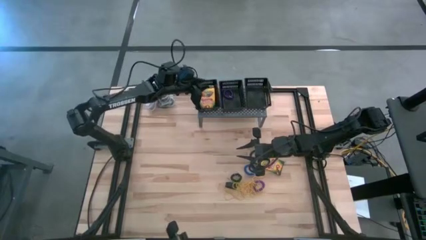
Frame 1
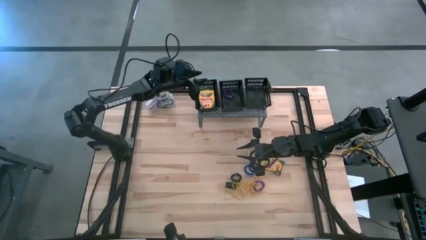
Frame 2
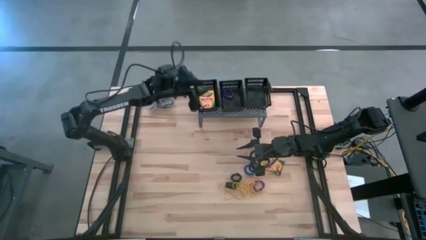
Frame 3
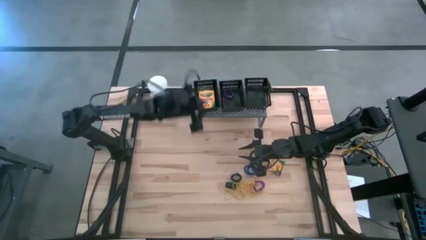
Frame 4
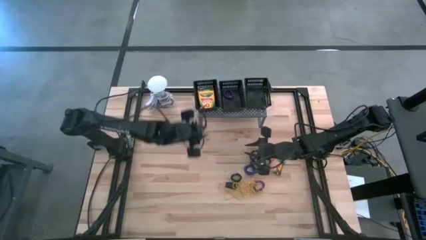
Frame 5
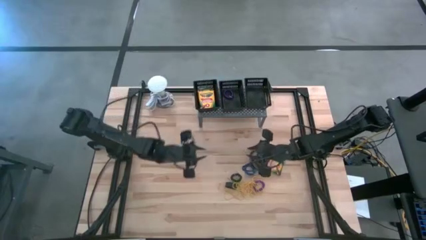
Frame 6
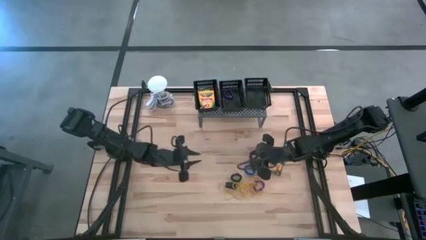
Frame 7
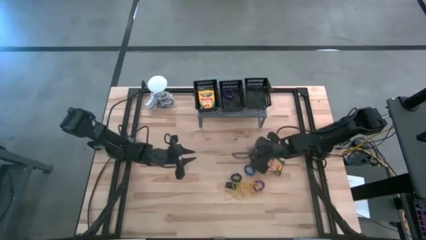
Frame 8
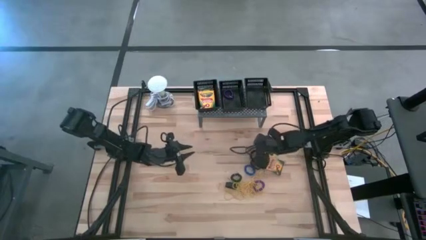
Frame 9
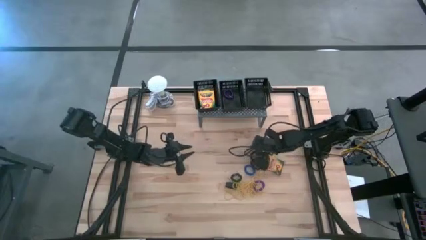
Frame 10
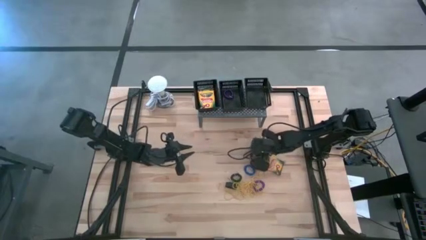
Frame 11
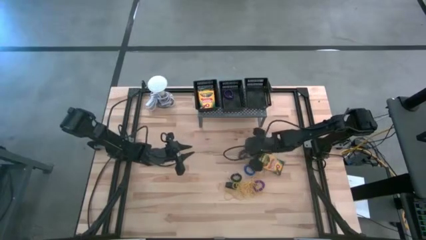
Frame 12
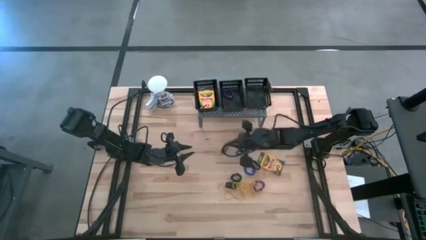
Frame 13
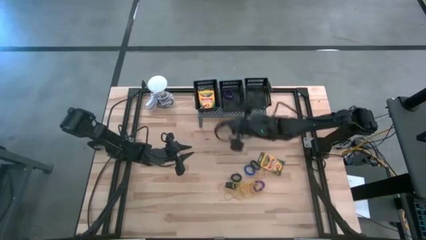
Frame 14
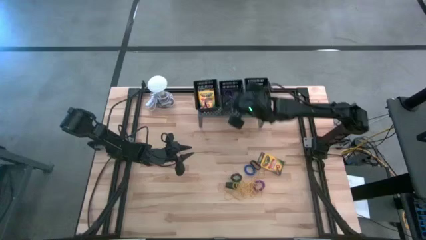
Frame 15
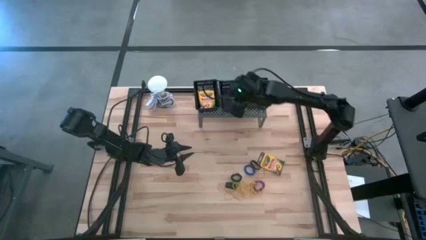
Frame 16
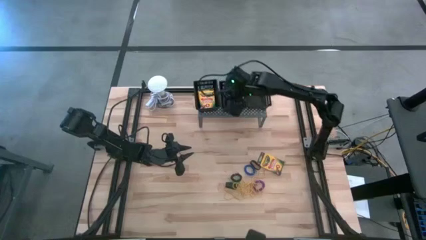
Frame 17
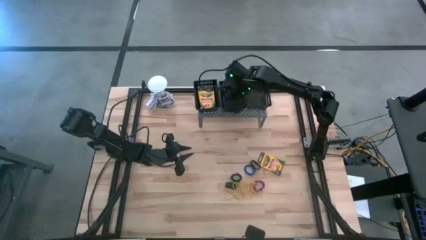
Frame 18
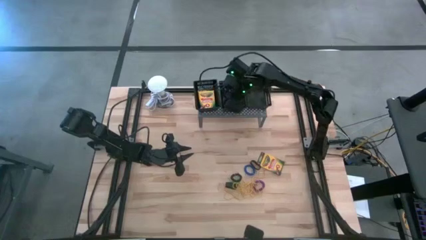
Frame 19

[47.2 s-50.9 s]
Task: Pick & Place Office Desk Supplies
Put the black spring keychain into the middle black bin on the shelf

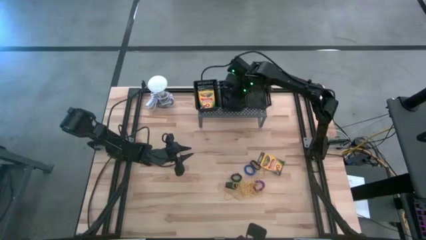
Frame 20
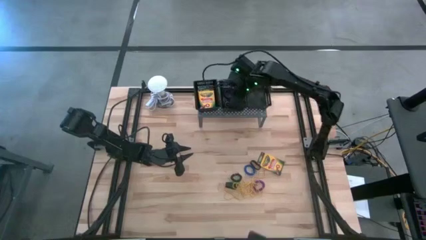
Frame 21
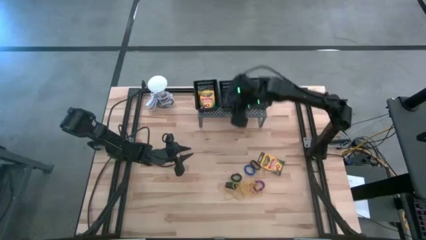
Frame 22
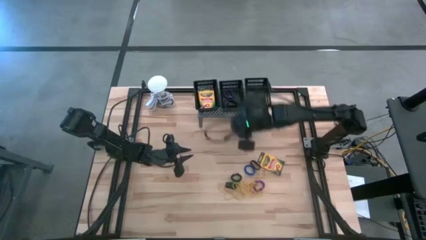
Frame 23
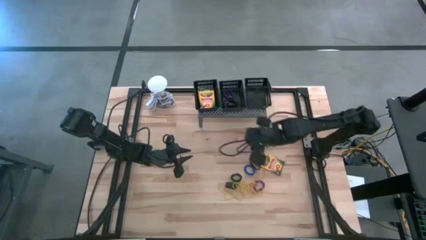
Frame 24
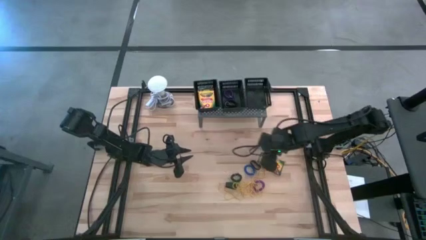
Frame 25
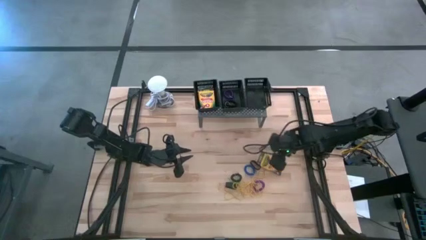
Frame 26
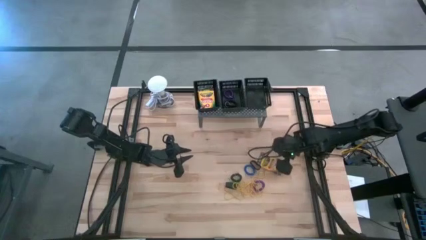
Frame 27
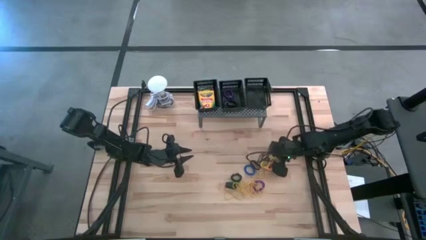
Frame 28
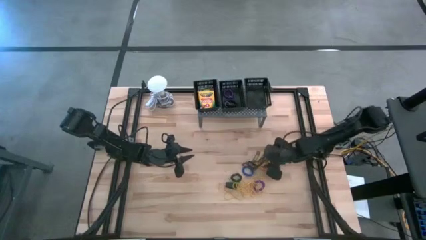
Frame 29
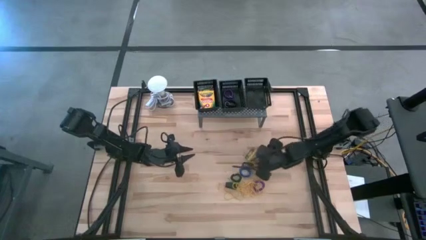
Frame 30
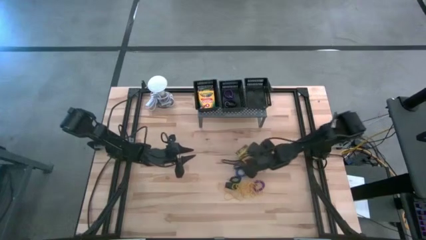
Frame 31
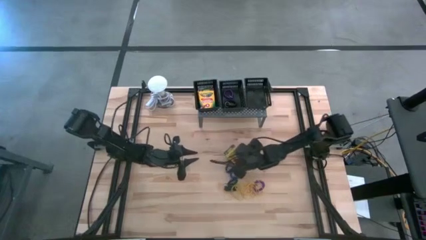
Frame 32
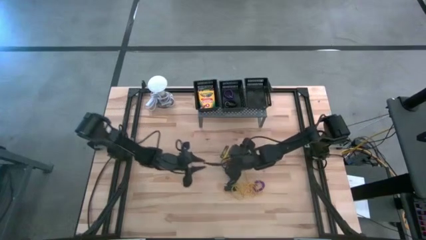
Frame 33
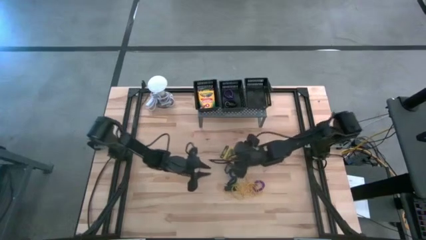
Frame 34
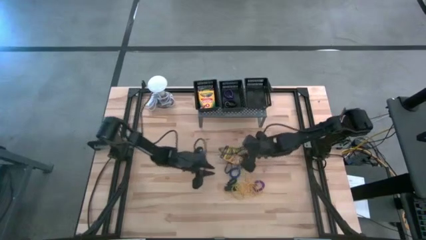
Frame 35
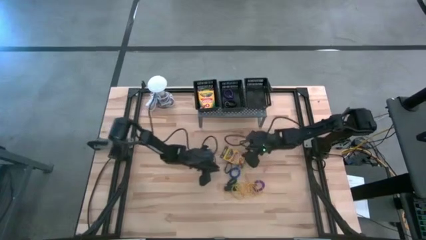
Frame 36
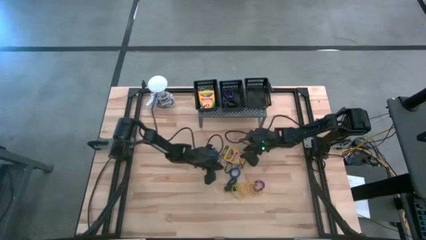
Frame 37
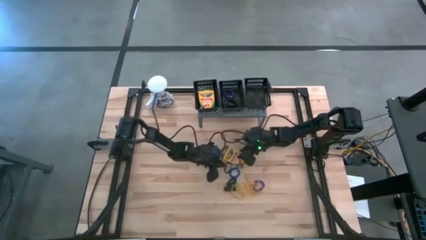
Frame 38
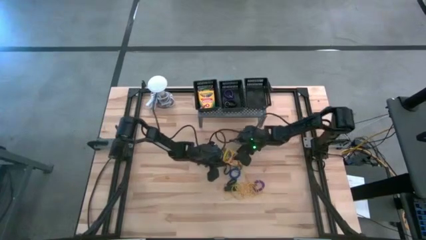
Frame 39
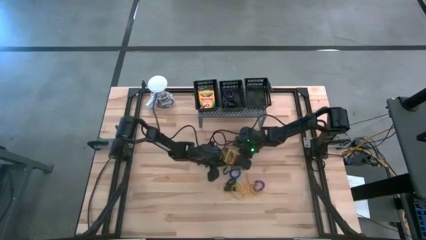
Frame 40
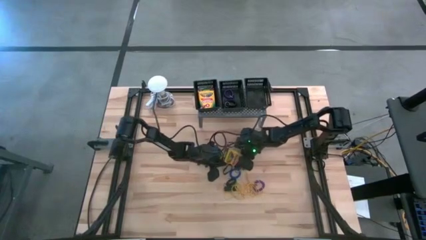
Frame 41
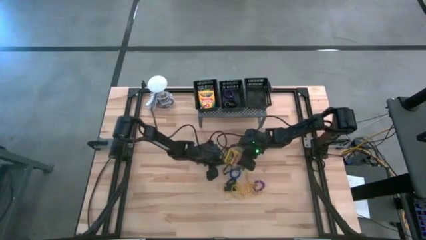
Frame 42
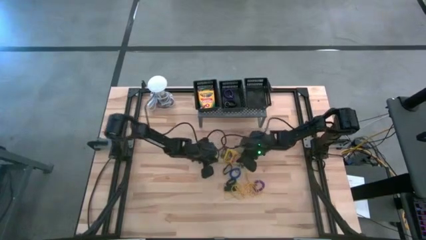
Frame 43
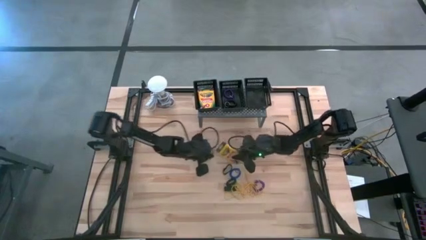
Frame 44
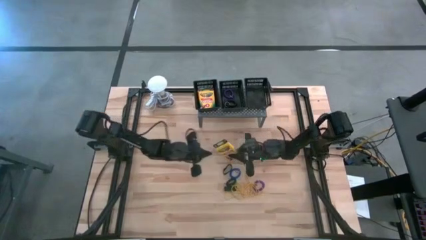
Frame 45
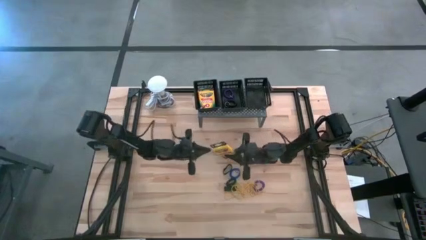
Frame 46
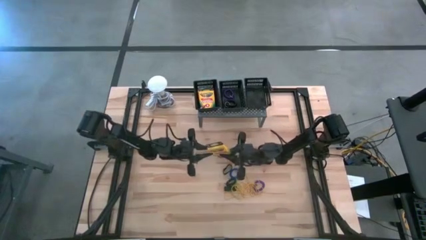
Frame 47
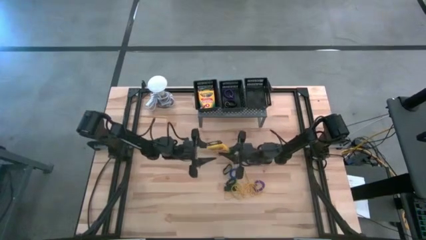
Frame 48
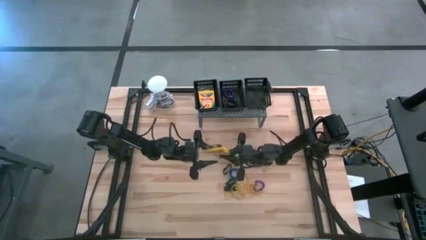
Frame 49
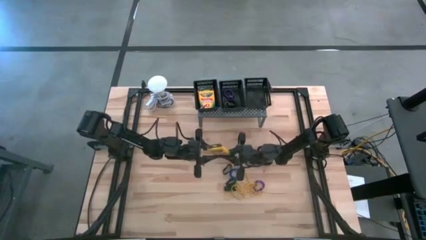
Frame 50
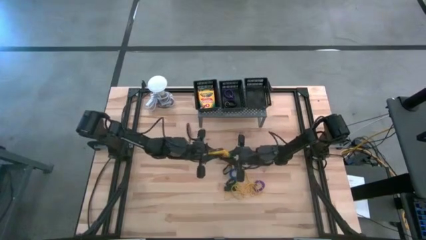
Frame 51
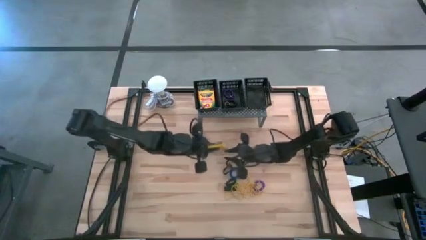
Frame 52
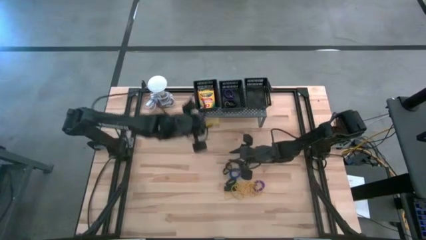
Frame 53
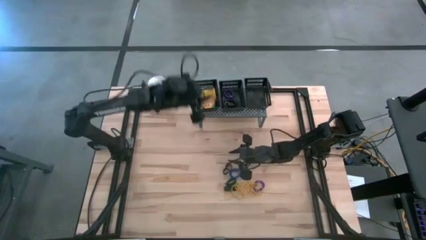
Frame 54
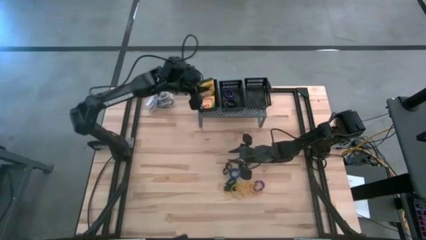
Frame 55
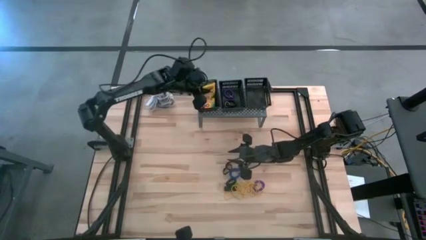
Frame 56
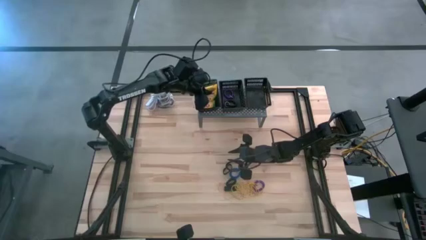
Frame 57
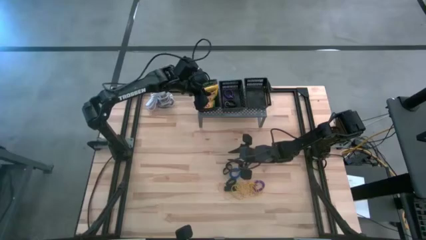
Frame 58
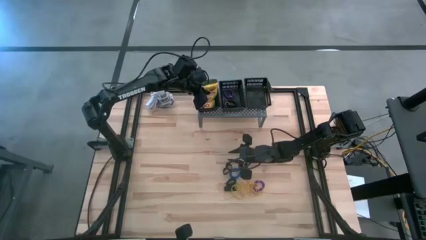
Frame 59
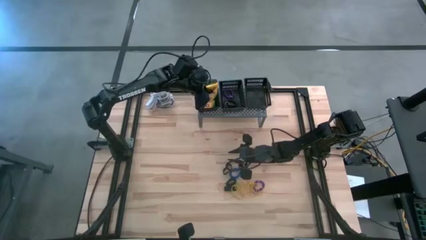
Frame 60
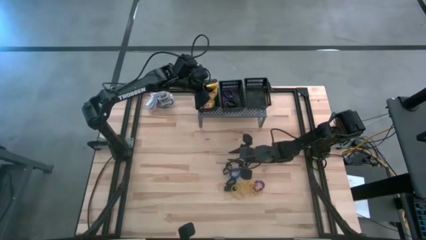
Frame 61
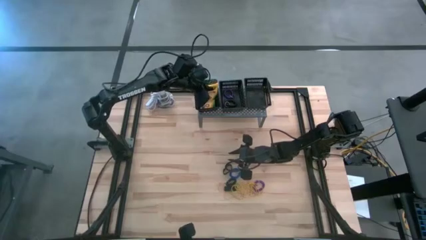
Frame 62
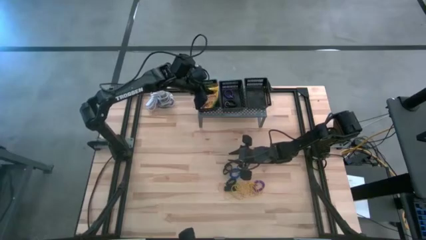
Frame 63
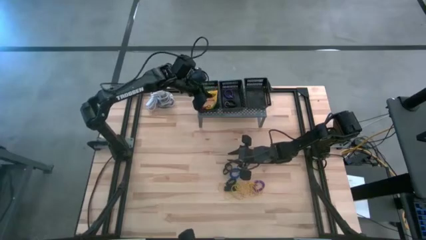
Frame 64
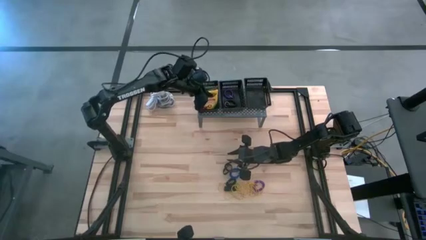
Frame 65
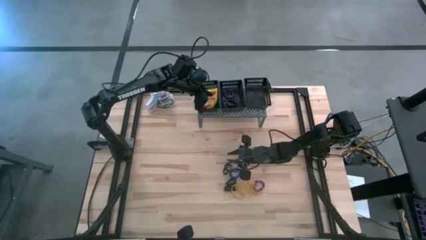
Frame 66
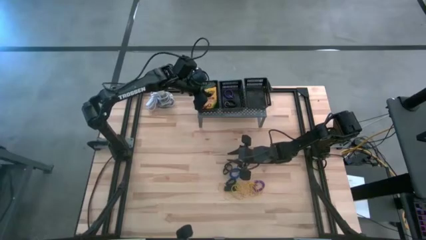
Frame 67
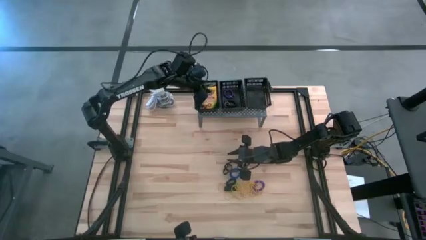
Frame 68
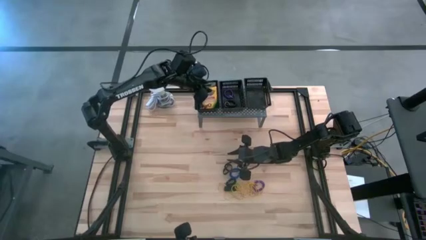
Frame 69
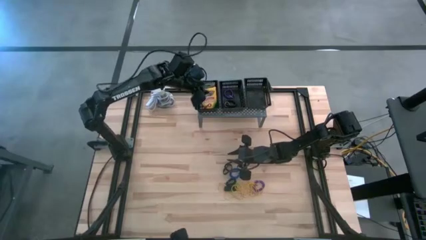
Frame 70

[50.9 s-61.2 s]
Put the yellow crayon box into the left black bin on the shelf

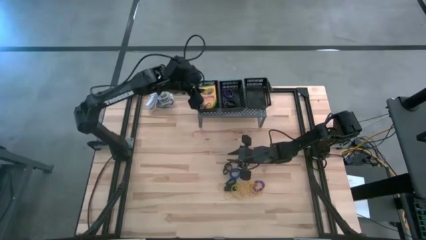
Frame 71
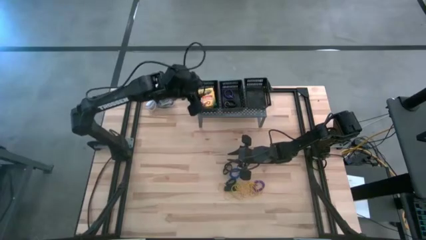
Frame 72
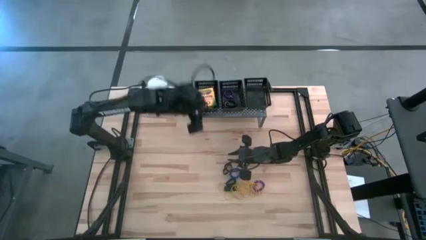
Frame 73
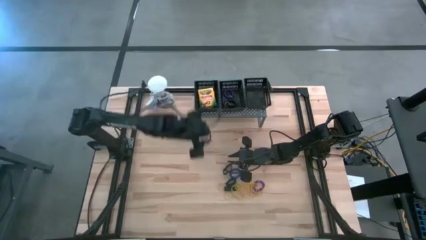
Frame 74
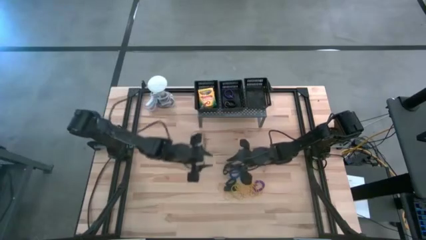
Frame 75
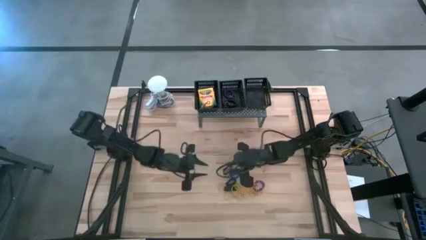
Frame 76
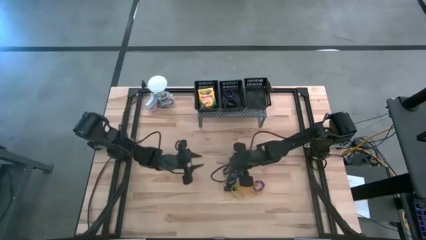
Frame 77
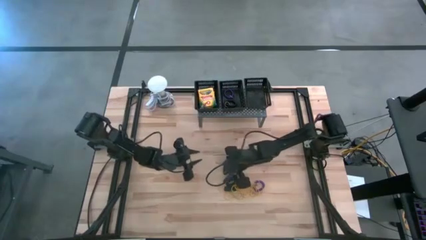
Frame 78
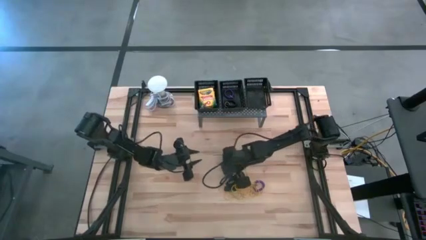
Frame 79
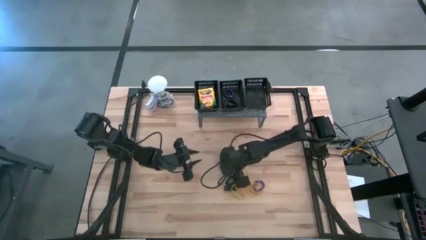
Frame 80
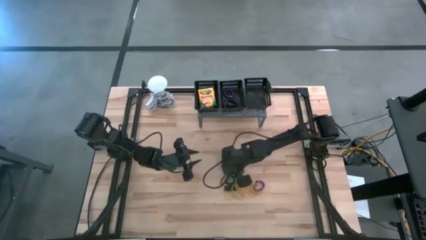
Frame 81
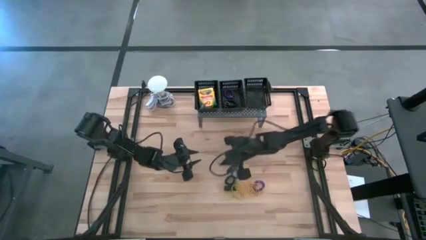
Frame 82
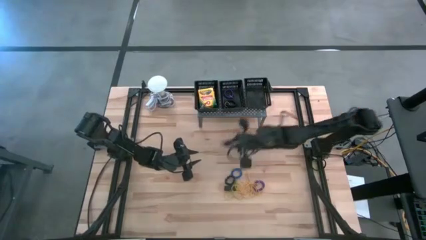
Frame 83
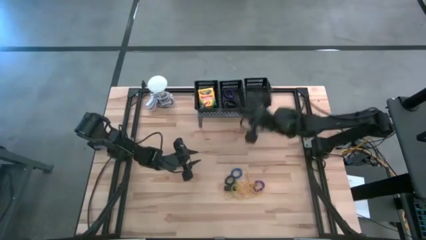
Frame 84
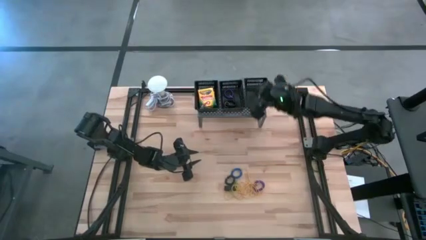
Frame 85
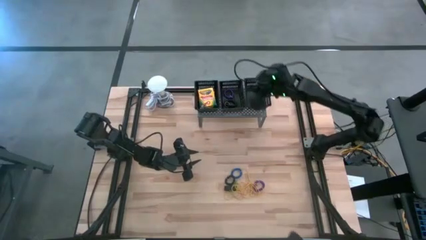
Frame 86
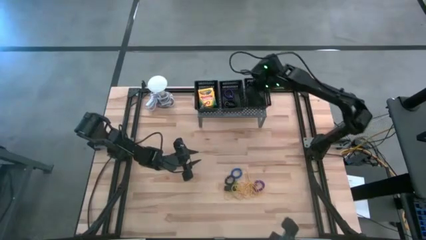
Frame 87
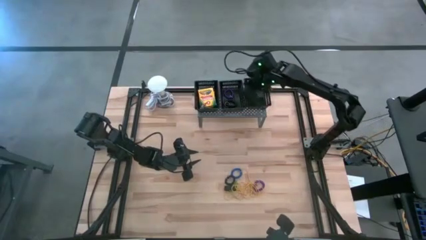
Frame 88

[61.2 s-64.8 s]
Put the black rubber band into the right black bin on the shelf

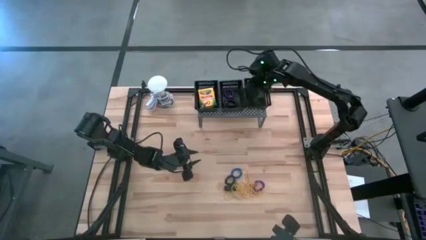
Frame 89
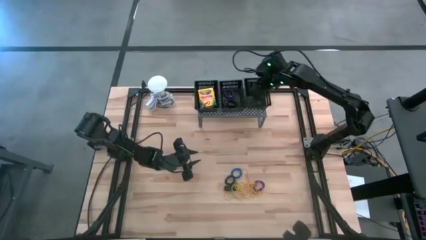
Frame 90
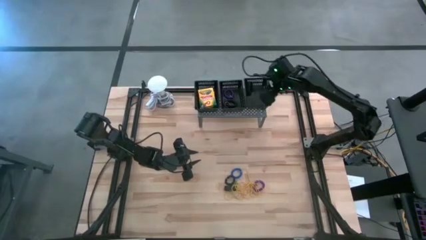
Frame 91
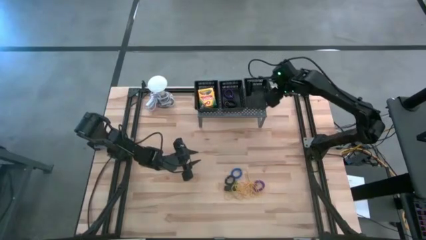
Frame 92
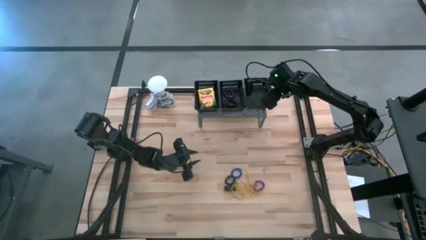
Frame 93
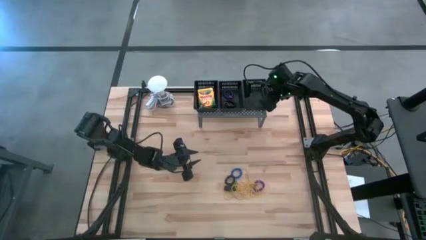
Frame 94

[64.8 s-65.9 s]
Adjust the right black bin on the shelf
